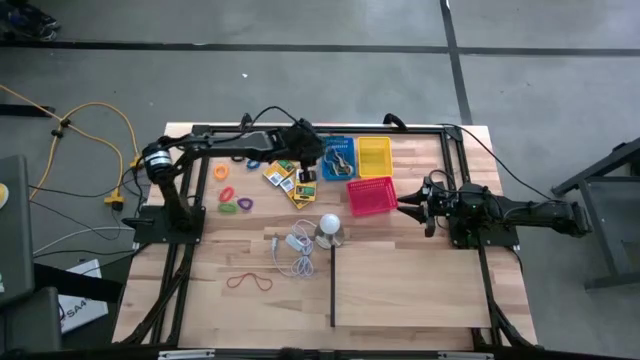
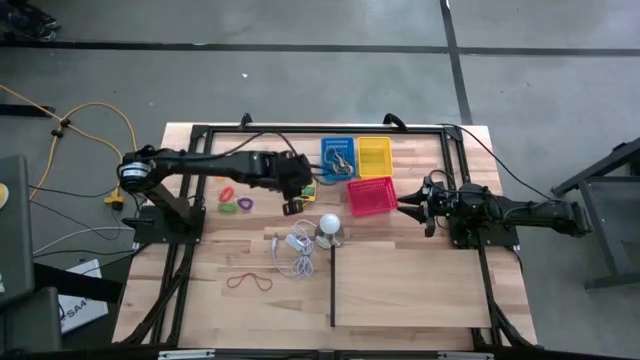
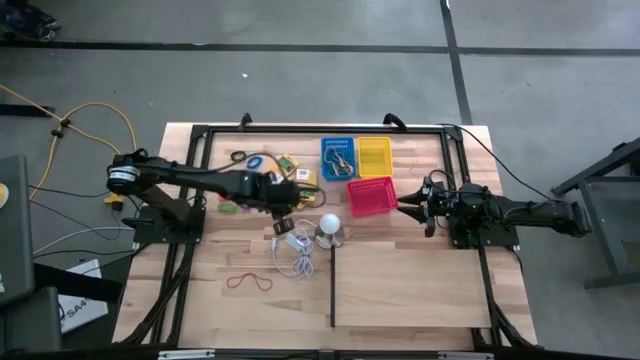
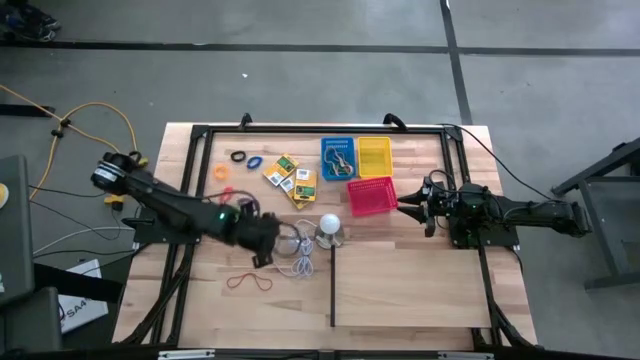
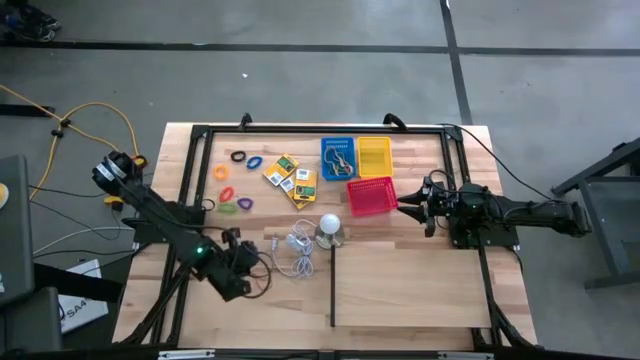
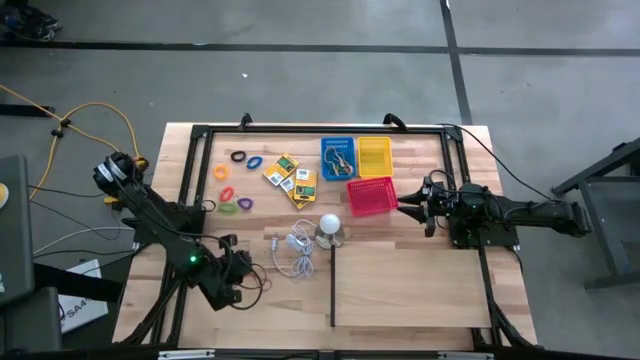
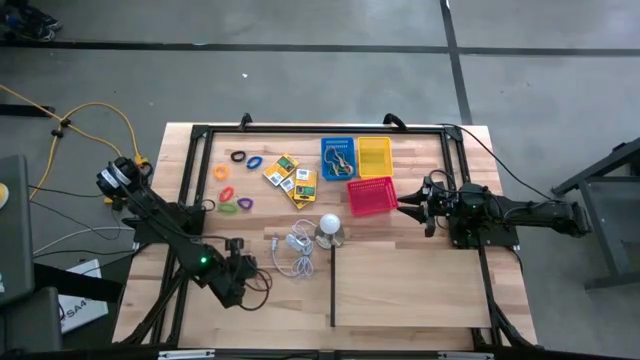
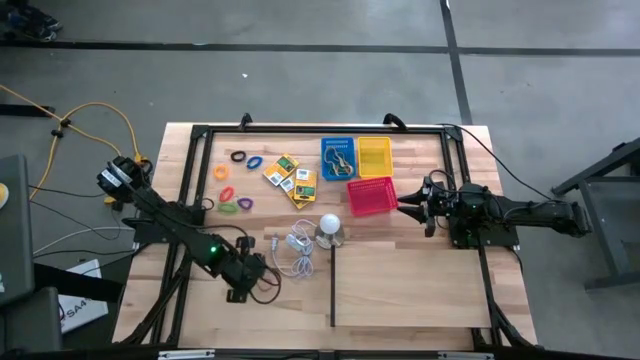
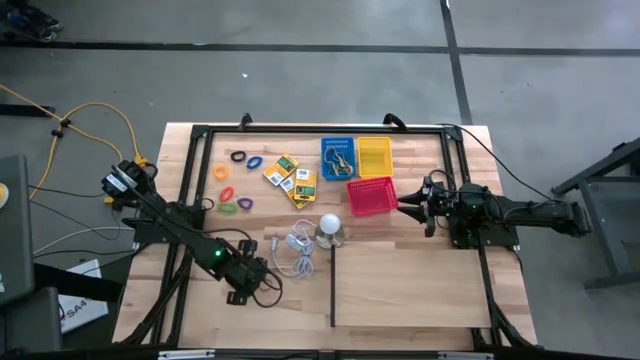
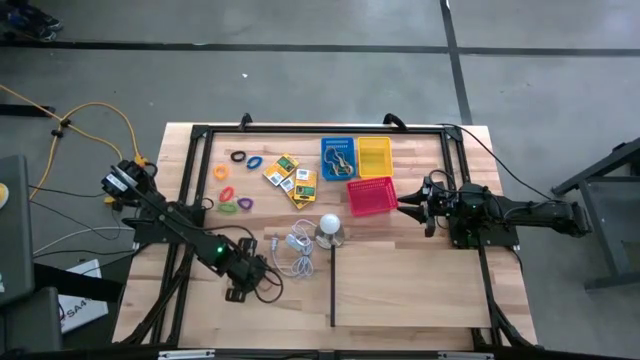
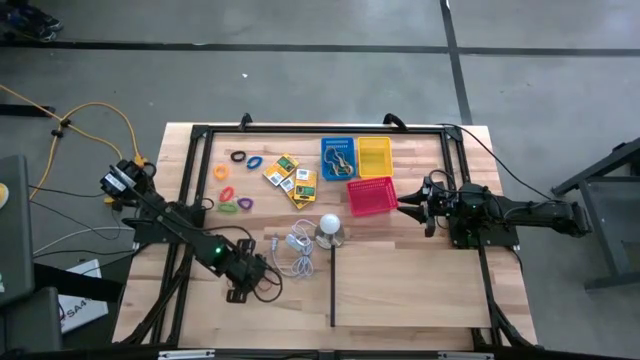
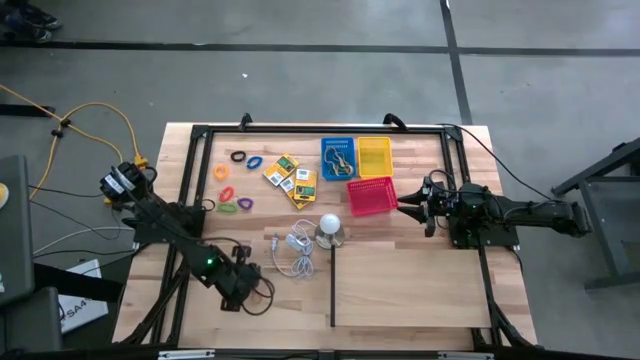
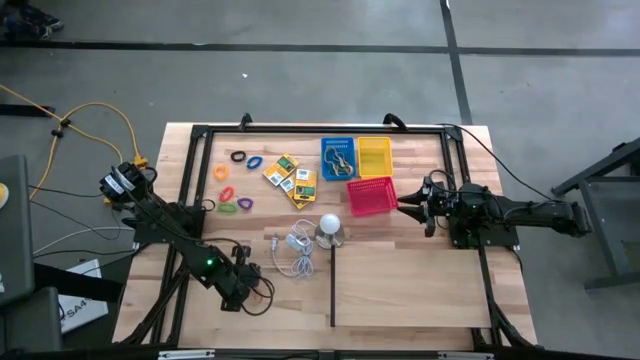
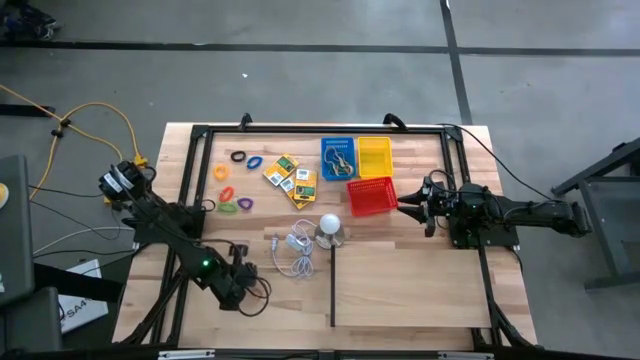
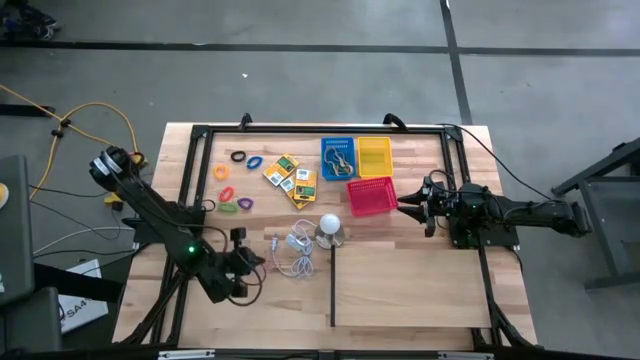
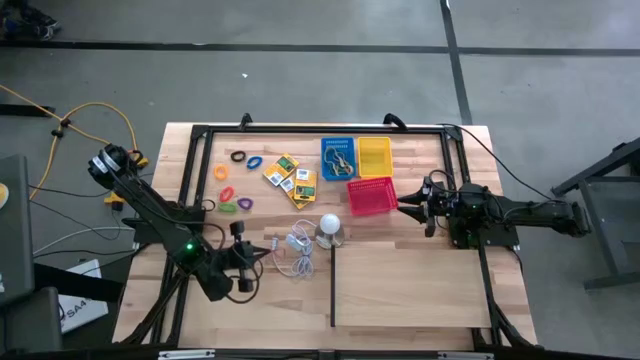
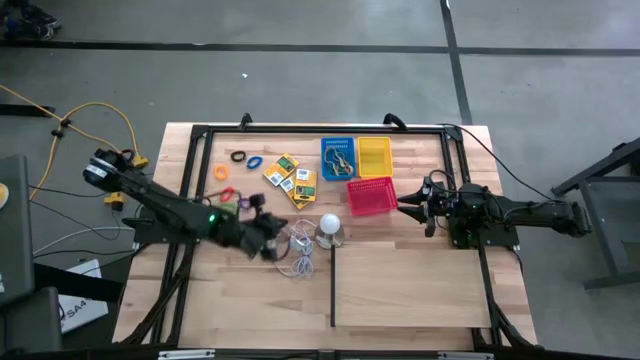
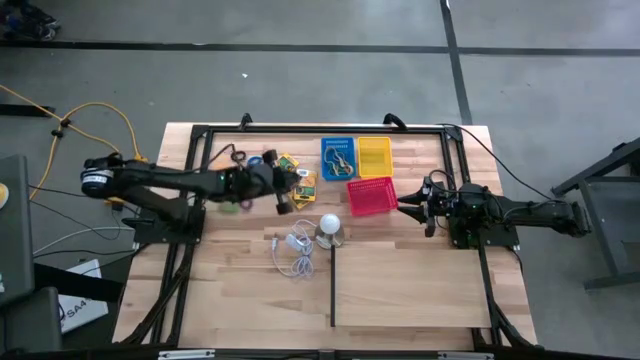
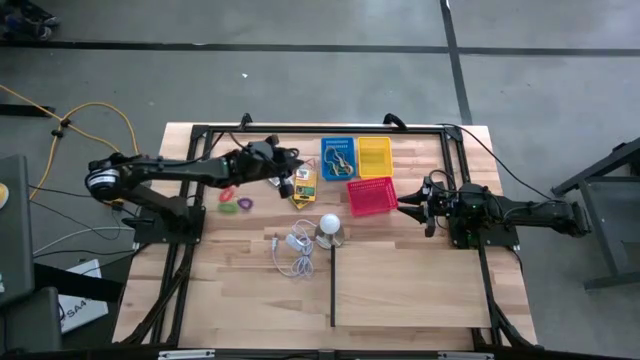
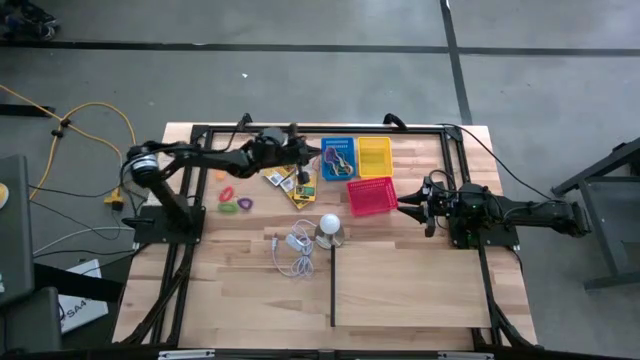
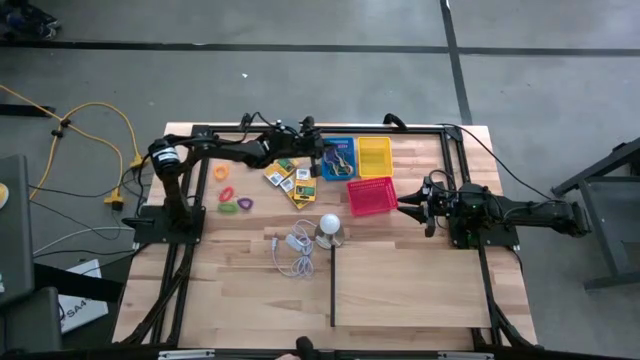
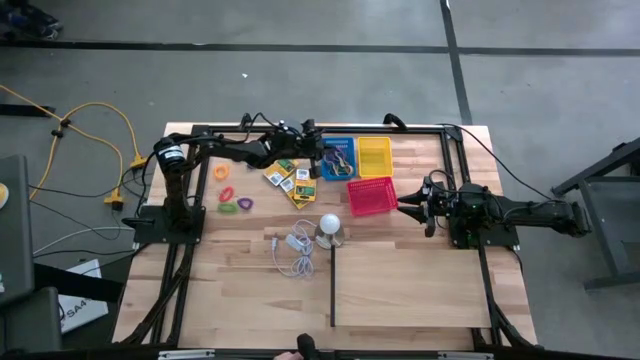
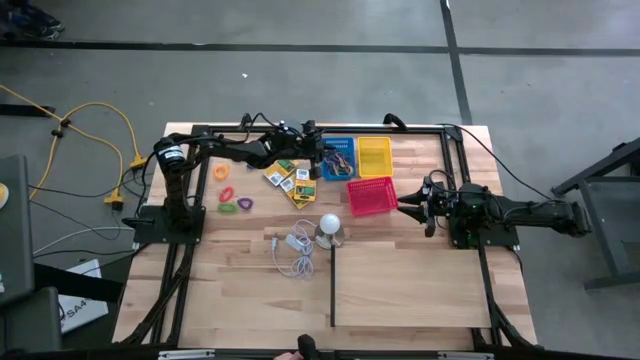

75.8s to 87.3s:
Task: Pick & Place Office Desk Supplies
Put the red rubber band into the blue bin

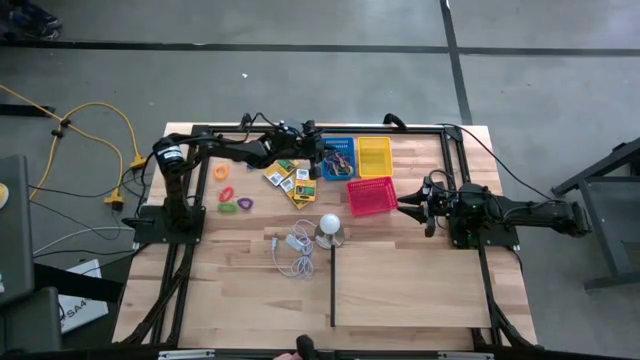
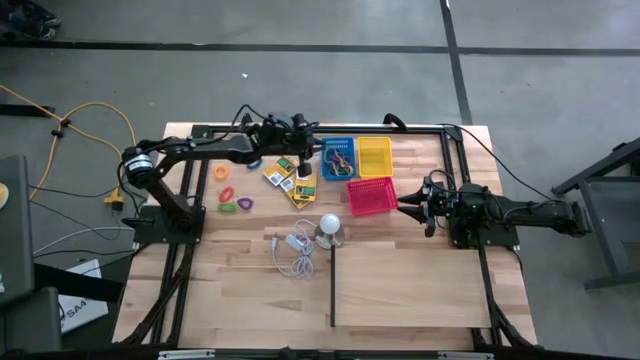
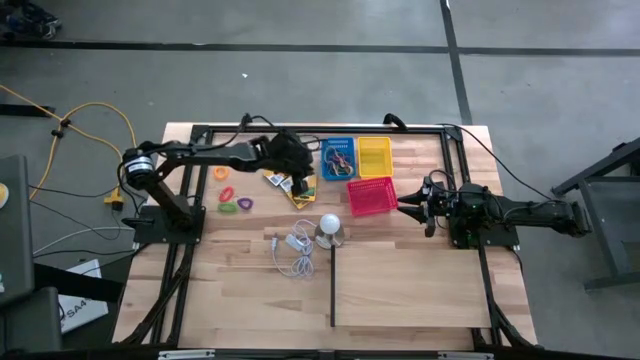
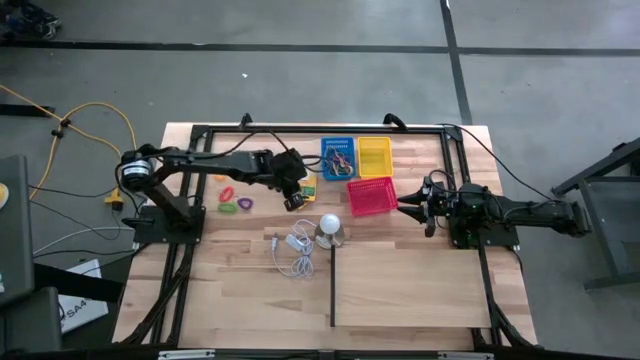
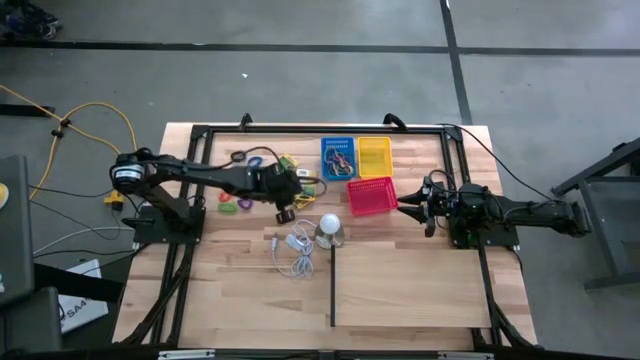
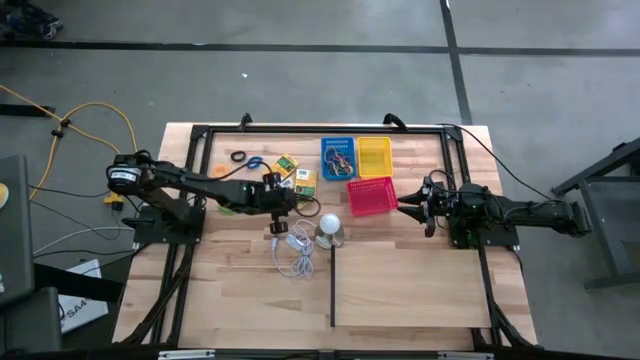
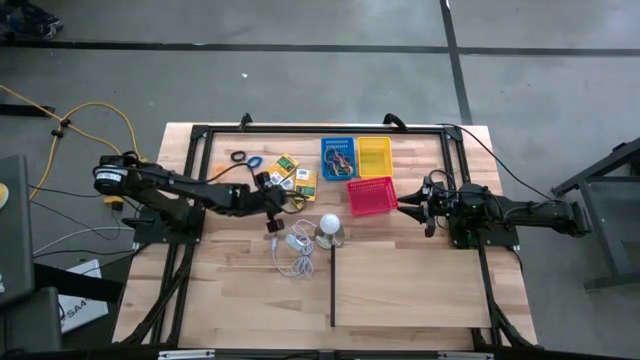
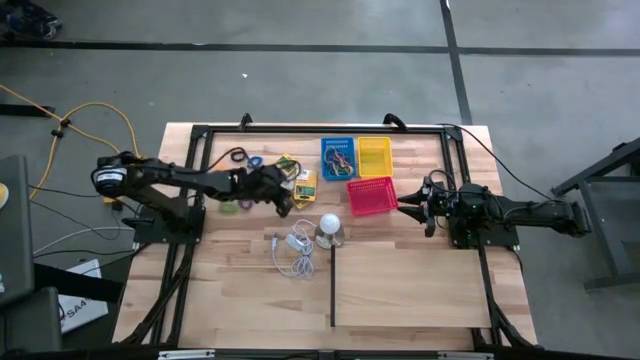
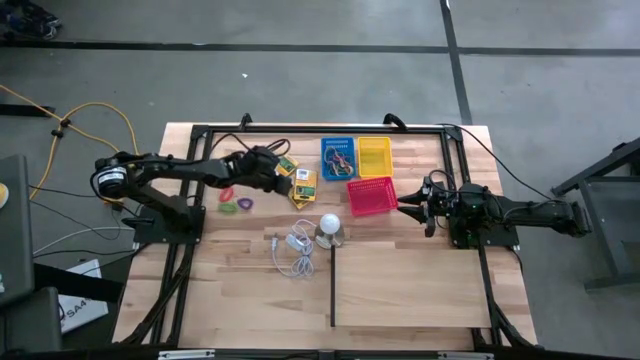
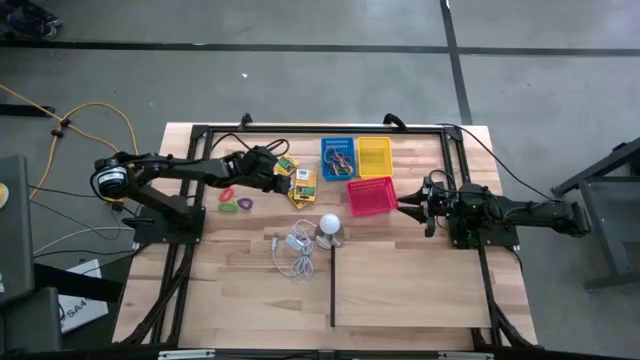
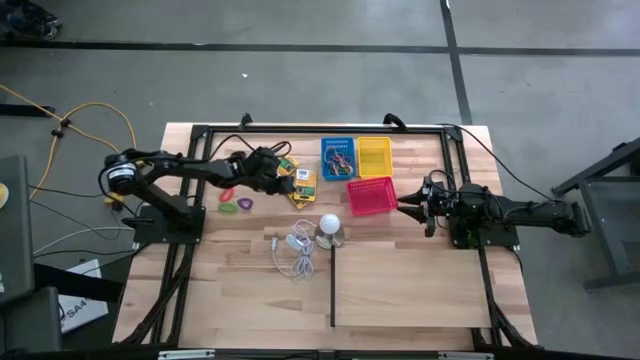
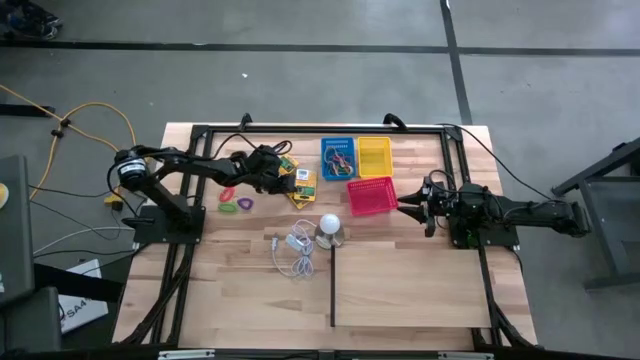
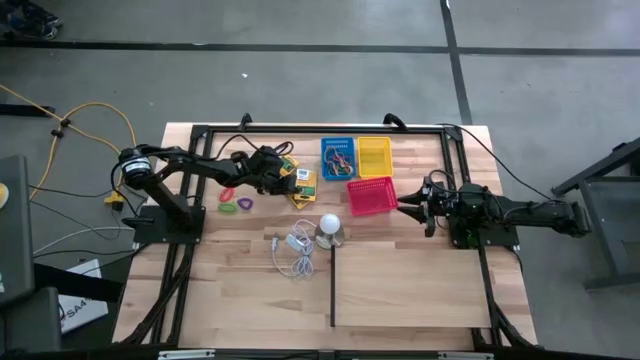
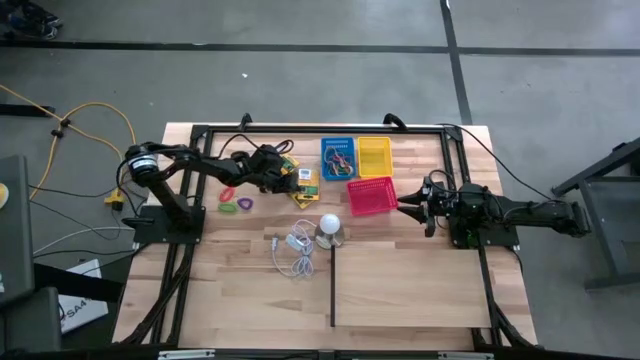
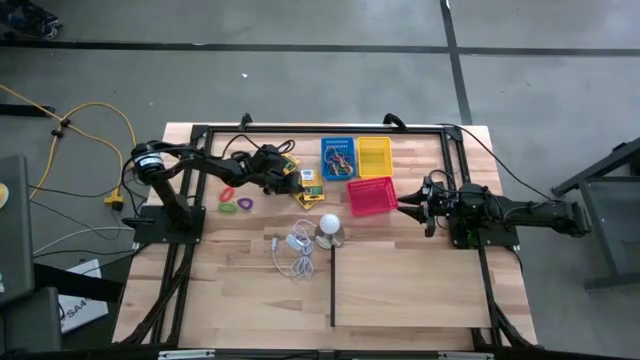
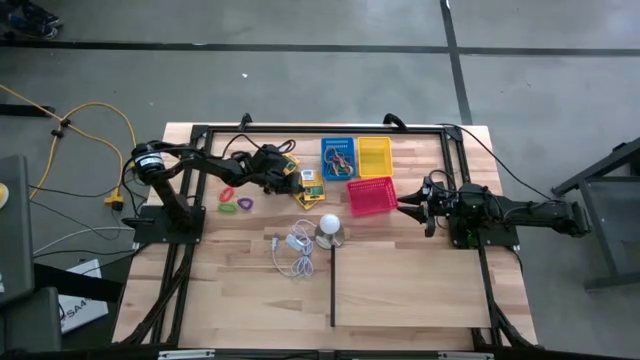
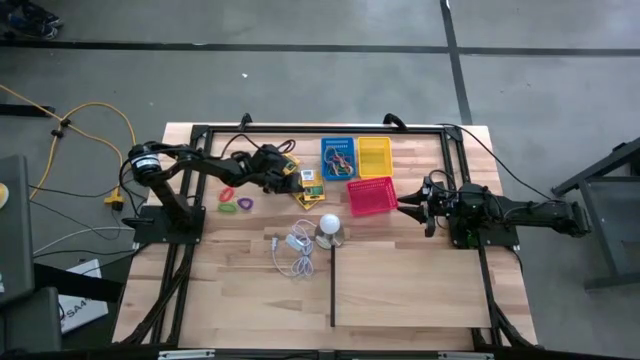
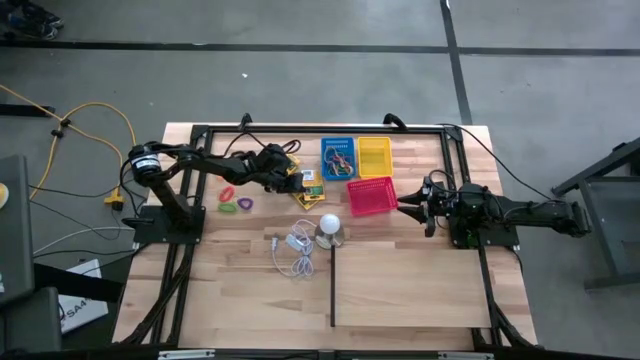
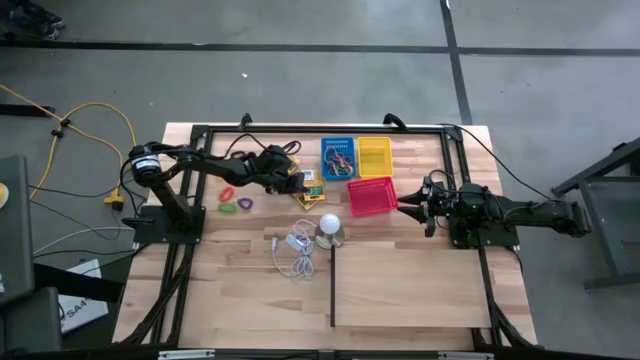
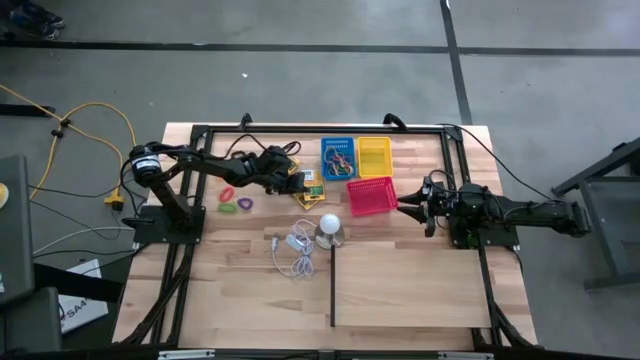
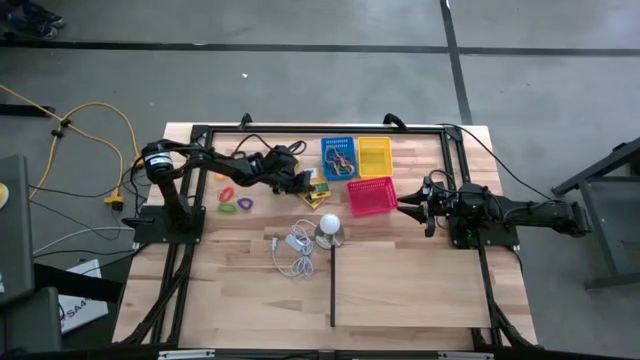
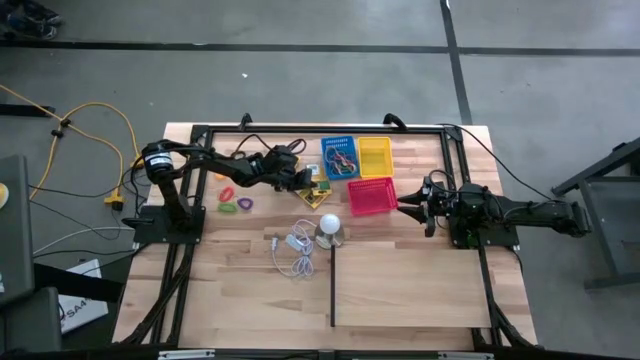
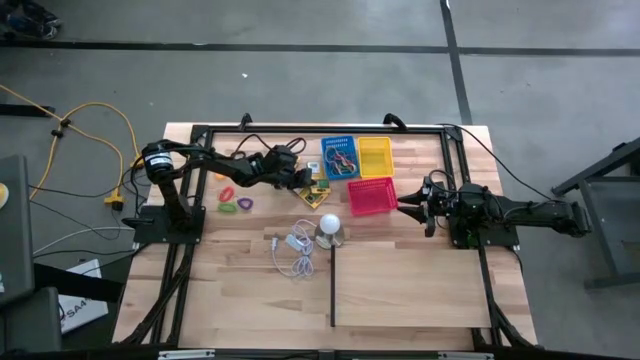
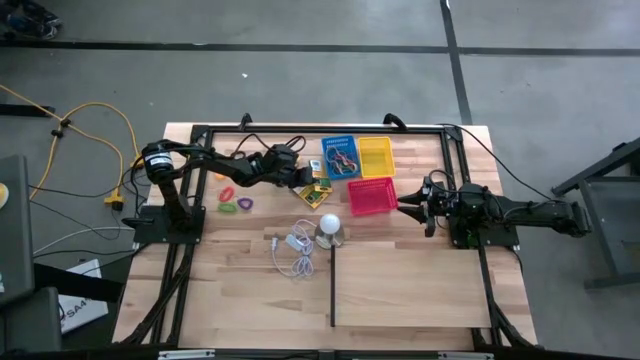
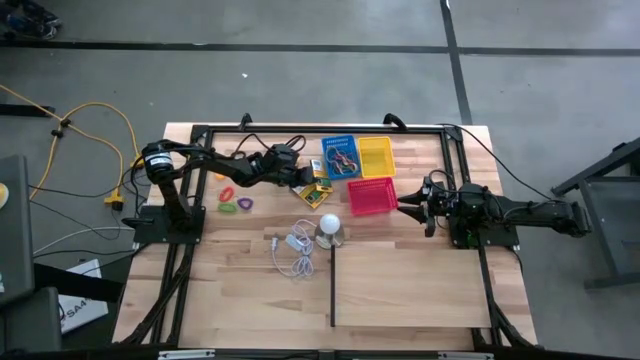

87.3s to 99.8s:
Put the right yellow crayon box into the yellow bin
